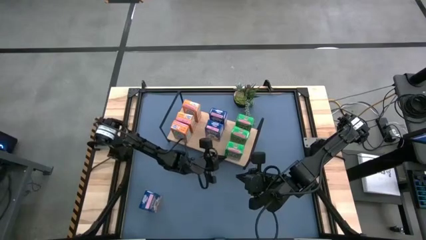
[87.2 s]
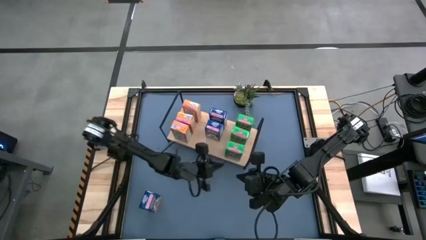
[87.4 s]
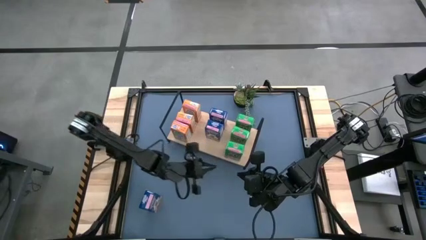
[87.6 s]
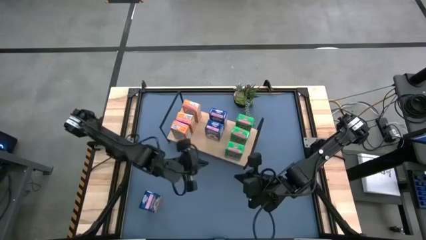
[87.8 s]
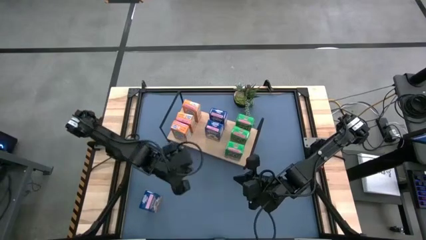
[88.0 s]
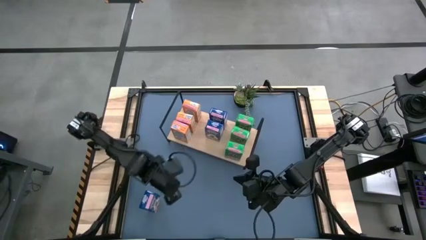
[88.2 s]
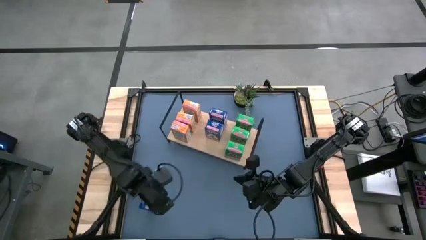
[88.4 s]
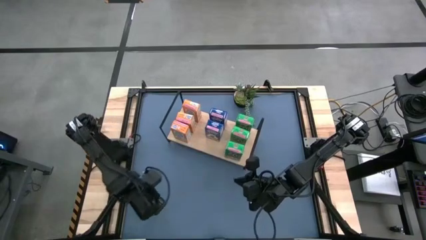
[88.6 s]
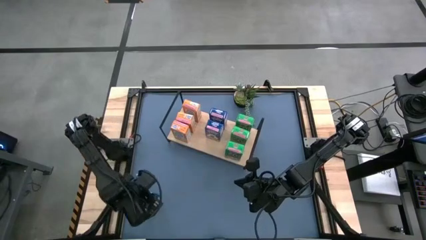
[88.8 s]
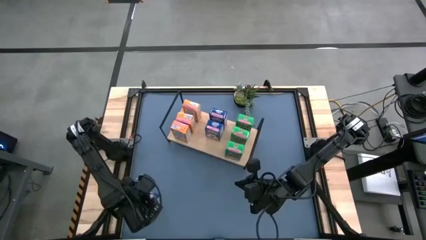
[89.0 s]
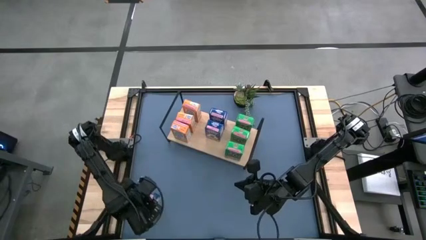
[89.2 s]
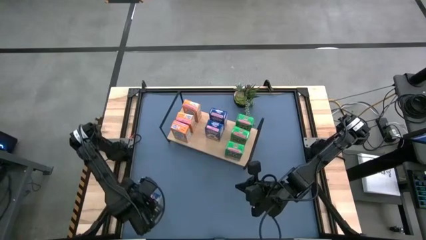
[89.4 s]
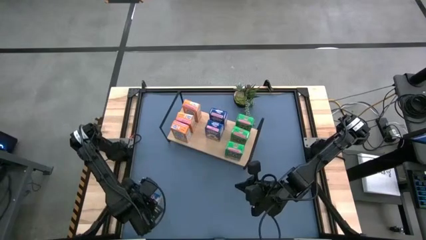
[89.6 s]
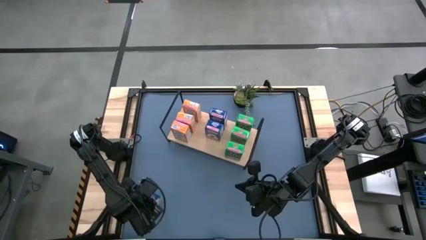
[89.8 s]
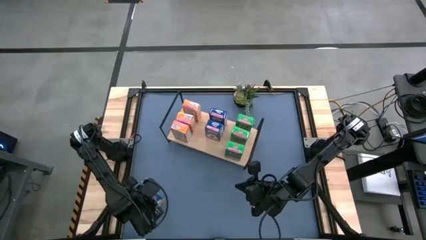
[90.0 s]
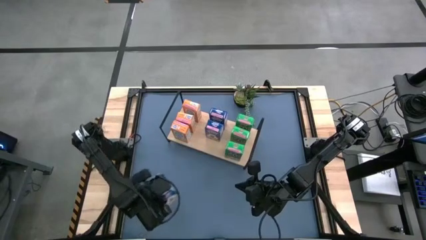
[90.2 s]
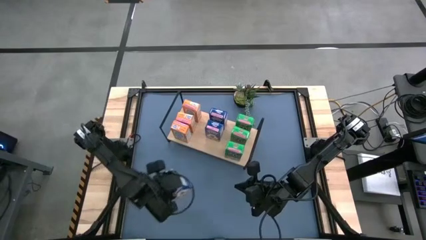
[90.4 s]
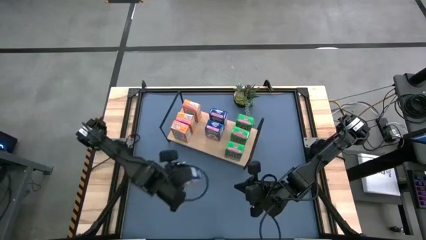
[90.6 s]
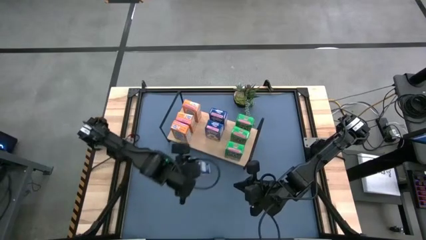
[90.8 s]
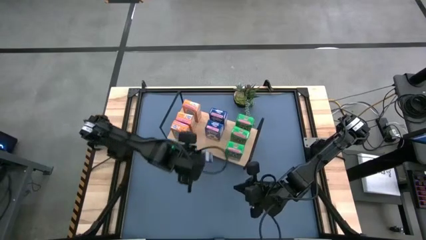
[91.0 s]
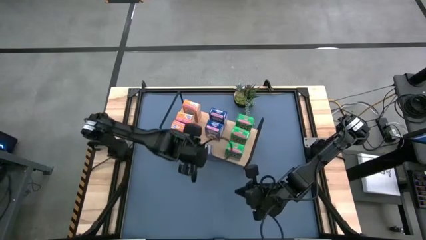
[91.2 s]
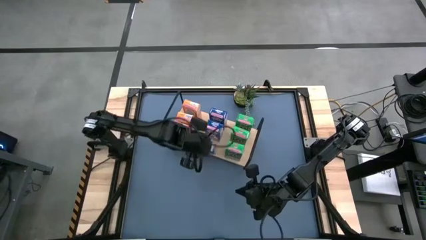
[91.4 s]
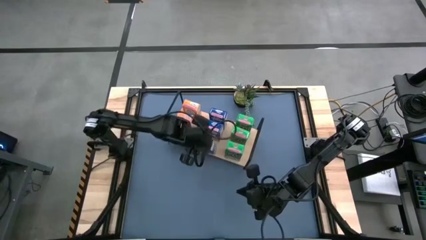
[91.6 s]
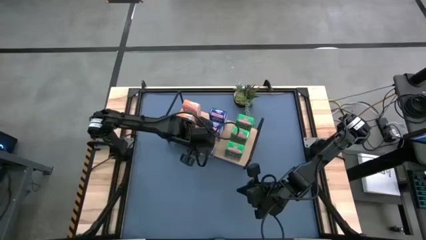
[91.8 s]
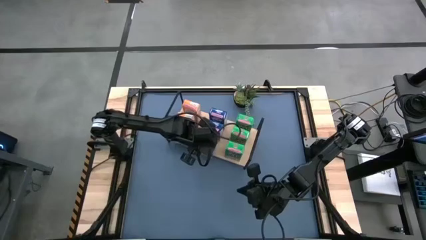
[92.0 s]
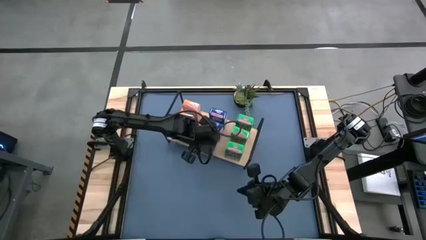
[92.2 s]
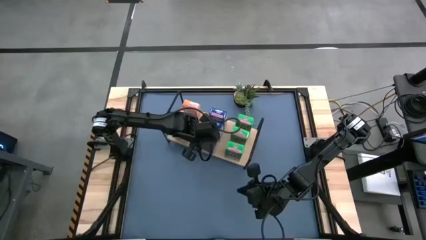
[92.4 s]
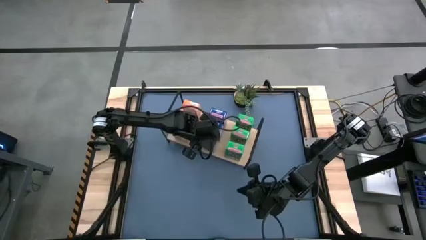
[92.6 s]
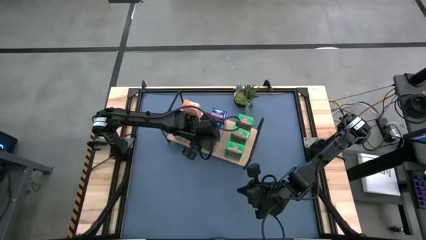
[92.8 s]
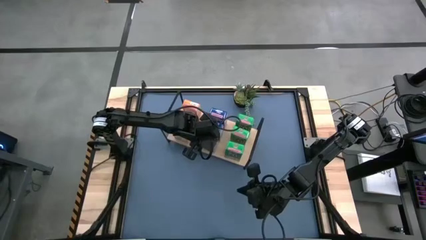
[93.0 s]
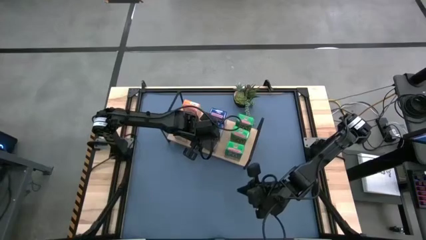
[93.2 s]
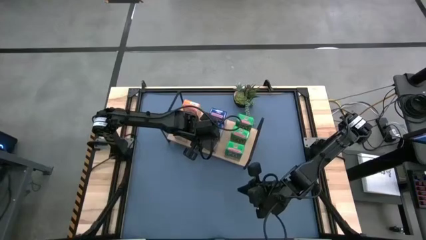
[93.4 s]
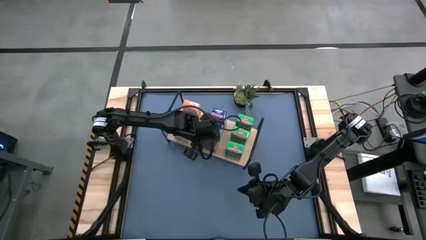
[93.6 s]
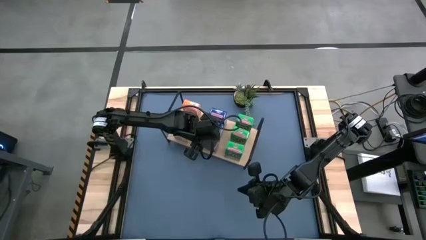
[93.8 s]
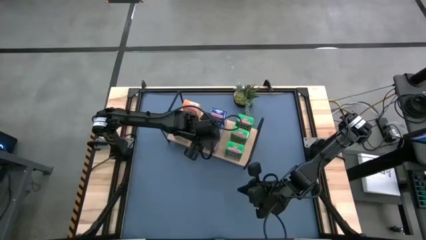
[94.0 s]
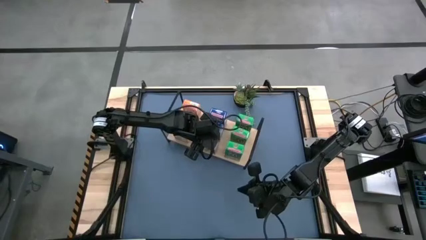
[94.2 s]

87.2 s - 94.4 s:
Task: Stack cereal on shelf
Put the blue cereal box on the shelf aligned with other blue cereal boxes

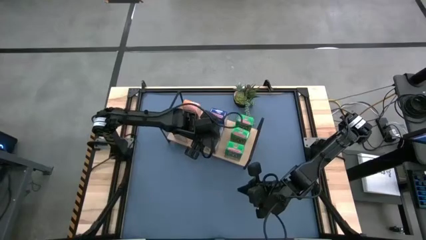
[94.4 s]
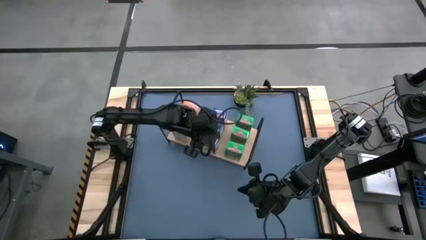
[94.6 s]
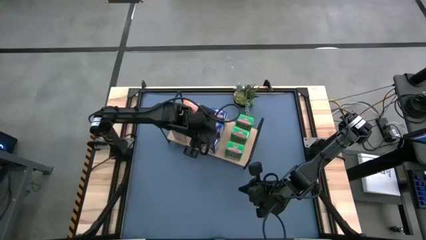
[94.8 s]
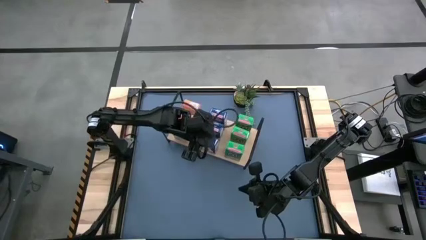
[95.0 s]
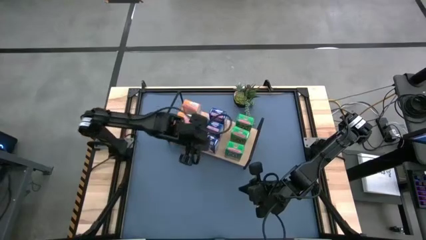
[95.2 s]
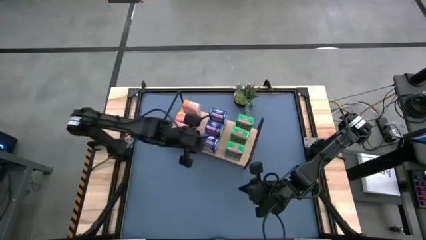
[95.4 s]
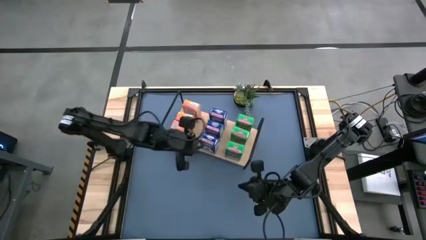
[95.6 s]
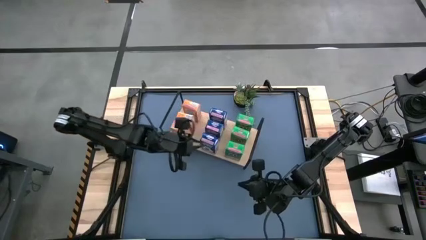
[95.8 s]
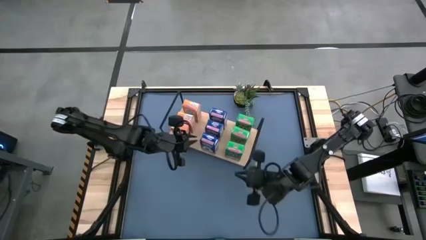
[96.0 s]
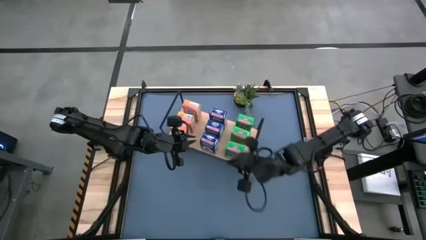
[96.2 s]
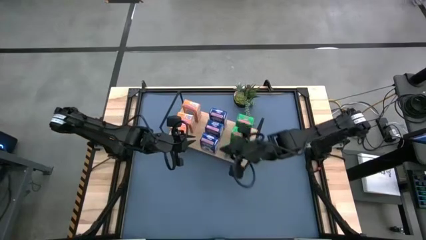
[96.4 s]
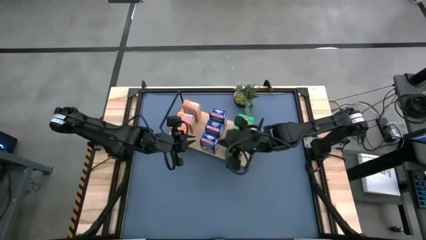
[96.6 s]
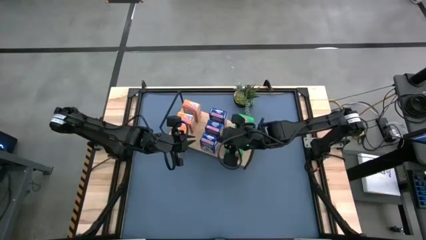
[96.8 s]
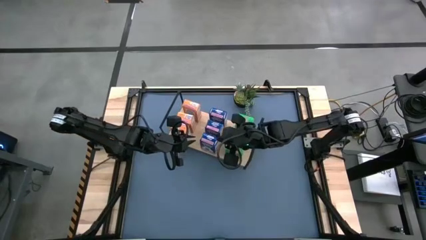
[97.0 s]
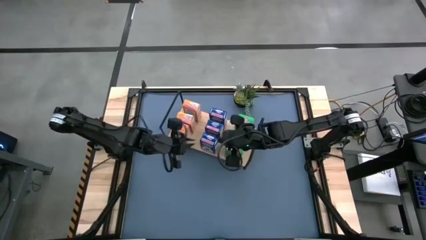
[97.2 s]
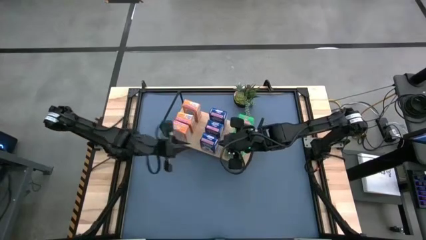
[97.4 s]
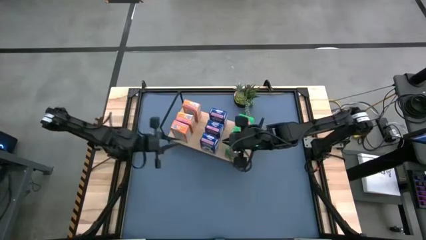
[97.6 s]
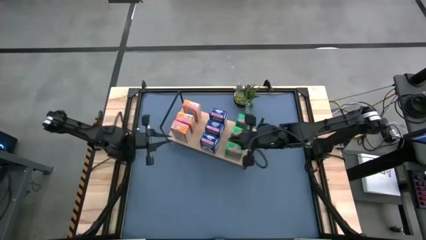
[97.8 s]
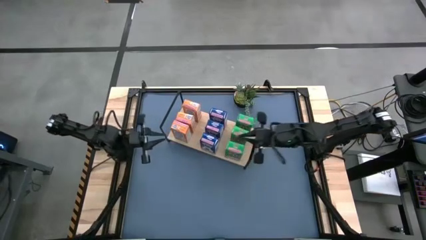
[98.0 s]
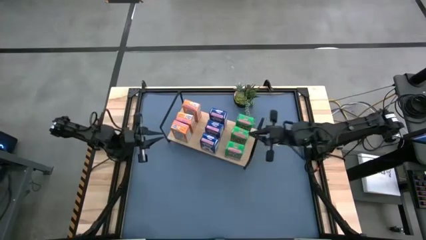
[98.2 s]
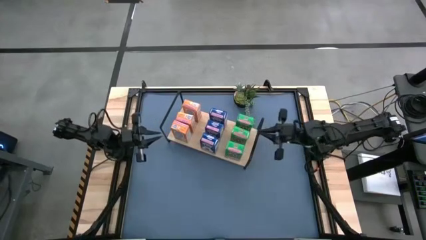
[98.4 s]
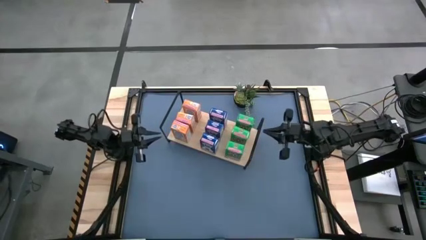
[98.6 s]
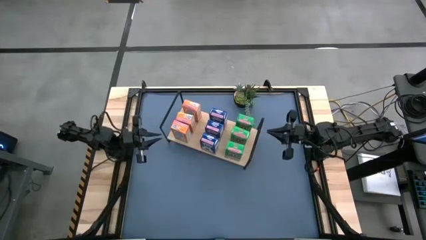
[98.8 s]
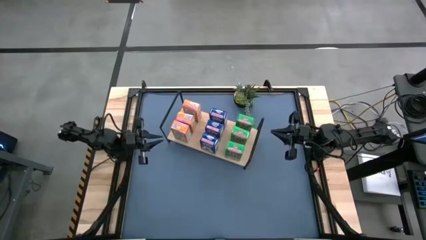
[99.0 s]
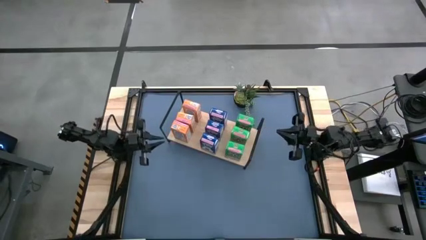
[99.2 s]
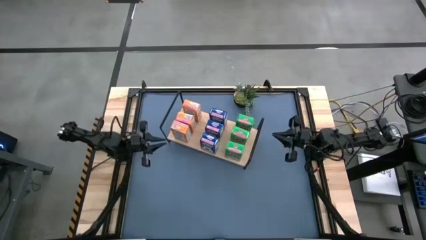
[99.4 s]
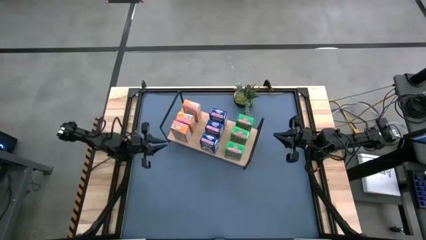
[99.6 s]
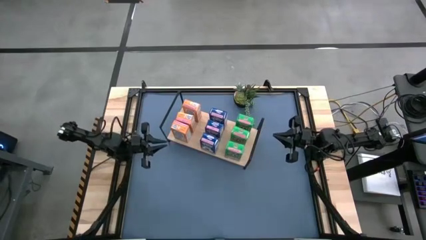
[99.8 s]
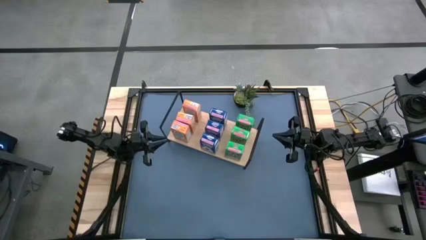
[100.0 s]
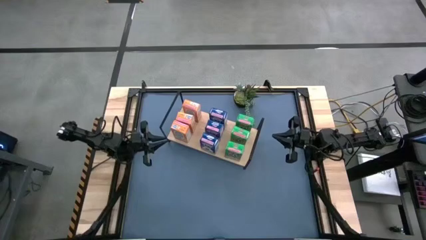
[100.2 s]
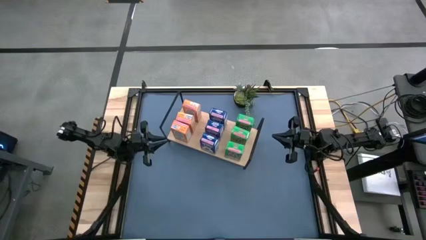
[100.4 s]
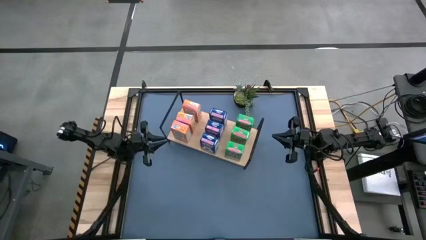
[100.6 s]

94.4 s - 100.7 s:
Return to Home Position
